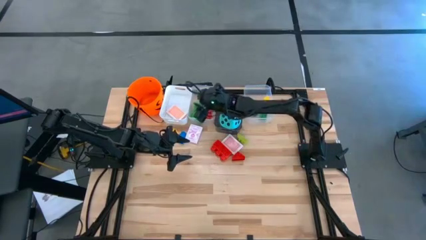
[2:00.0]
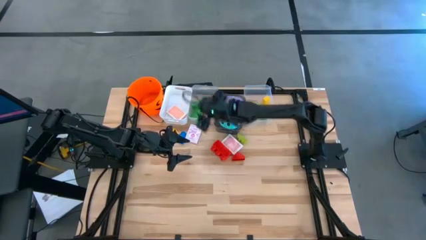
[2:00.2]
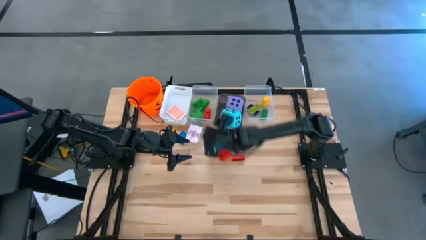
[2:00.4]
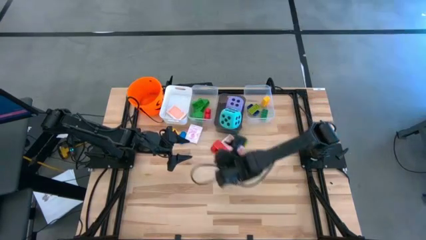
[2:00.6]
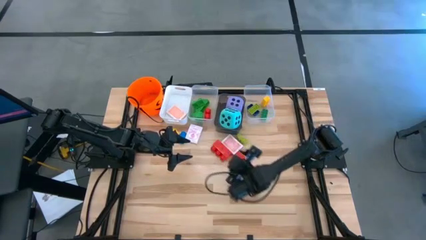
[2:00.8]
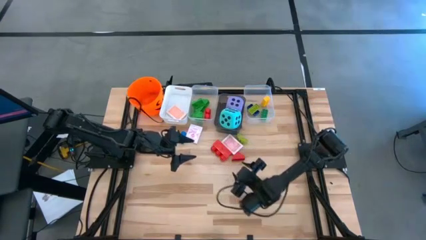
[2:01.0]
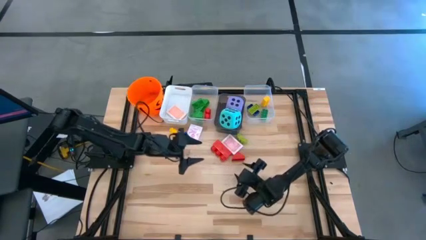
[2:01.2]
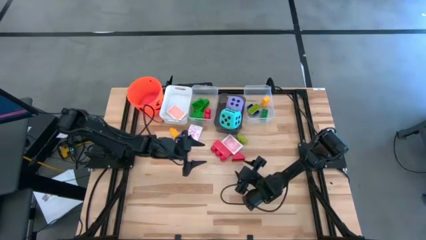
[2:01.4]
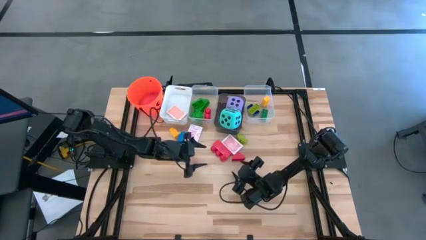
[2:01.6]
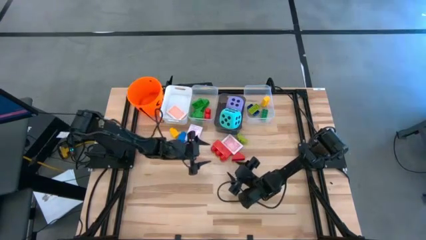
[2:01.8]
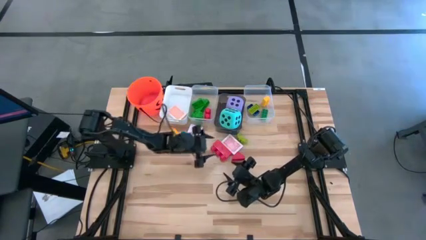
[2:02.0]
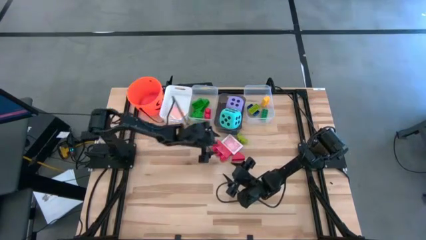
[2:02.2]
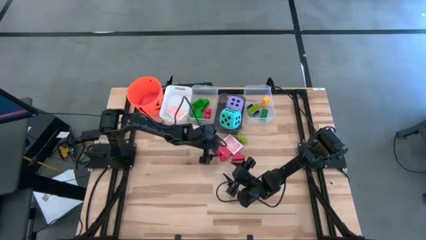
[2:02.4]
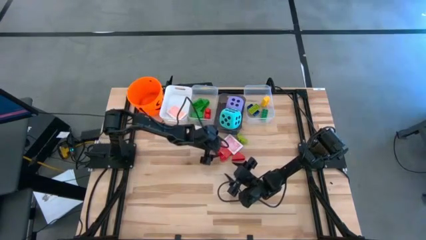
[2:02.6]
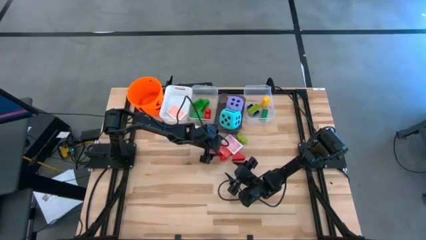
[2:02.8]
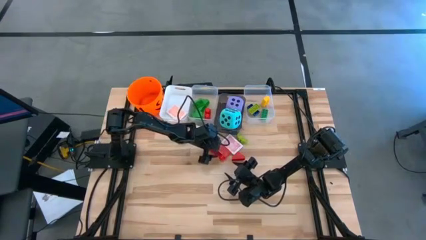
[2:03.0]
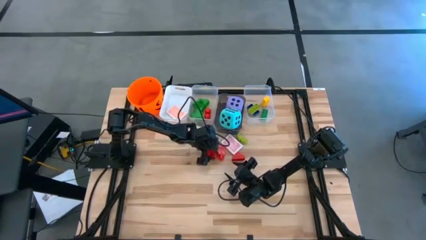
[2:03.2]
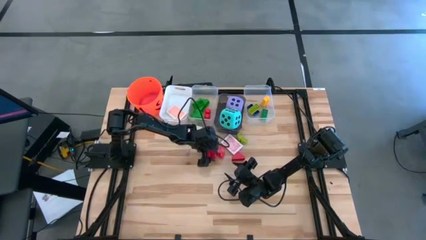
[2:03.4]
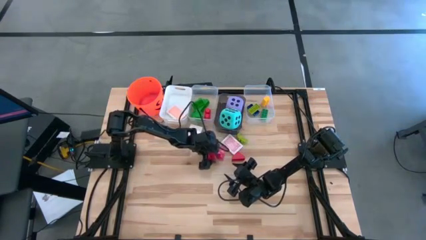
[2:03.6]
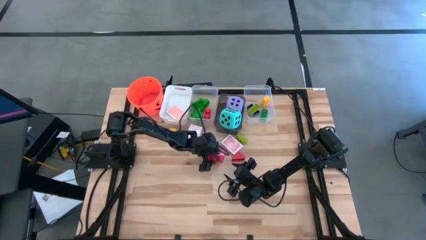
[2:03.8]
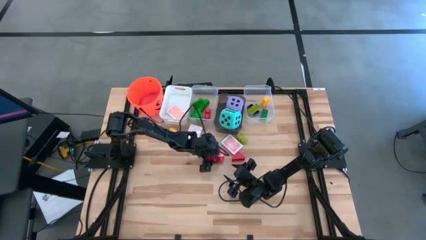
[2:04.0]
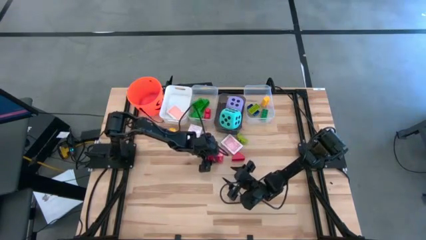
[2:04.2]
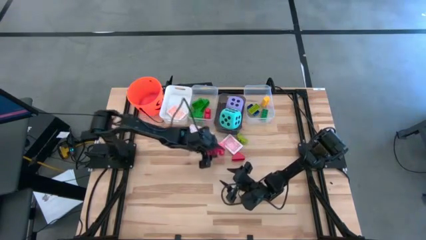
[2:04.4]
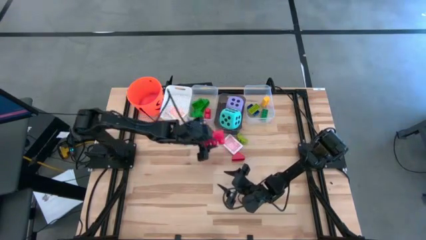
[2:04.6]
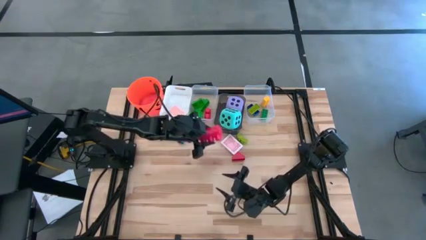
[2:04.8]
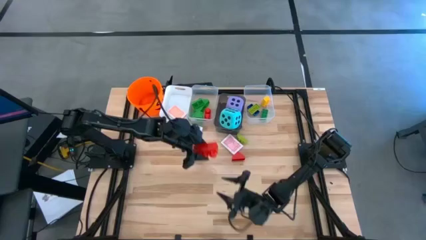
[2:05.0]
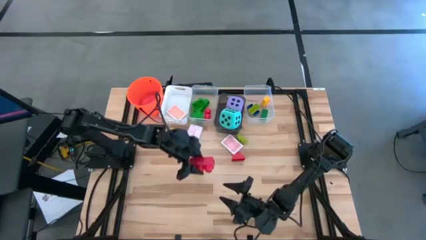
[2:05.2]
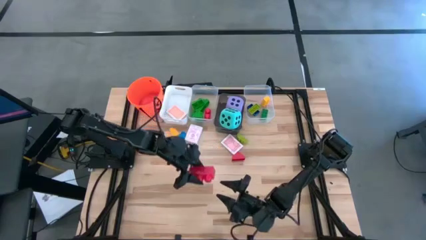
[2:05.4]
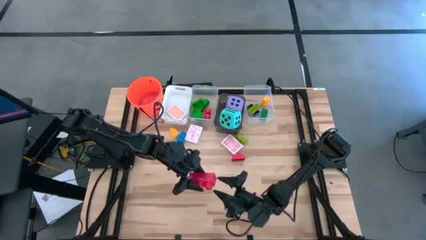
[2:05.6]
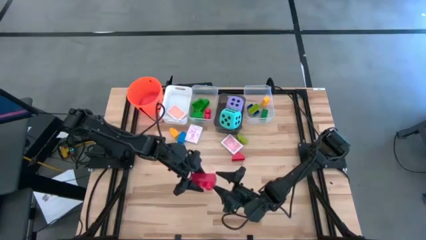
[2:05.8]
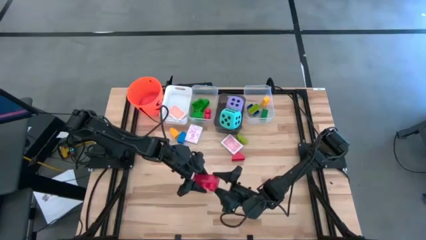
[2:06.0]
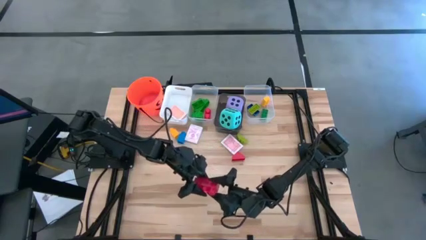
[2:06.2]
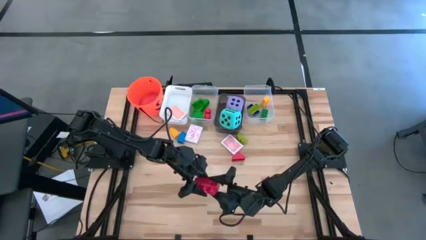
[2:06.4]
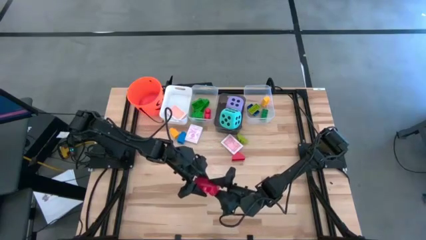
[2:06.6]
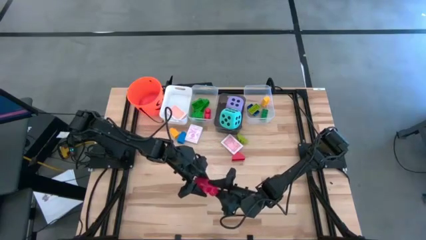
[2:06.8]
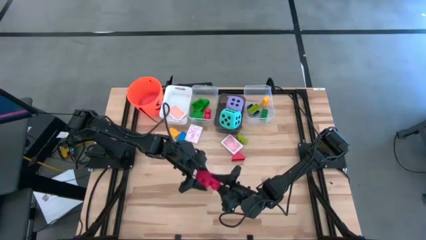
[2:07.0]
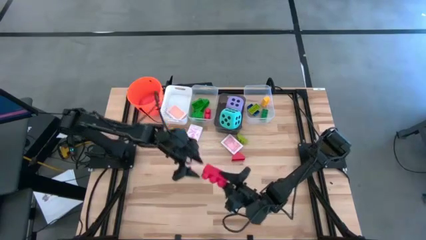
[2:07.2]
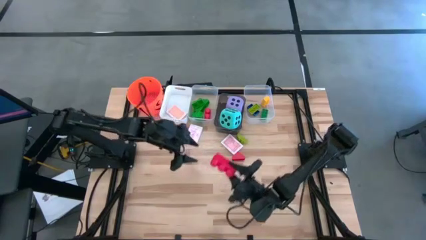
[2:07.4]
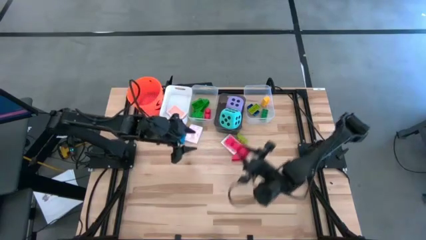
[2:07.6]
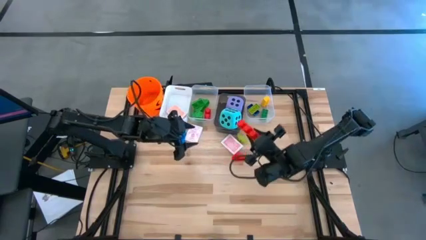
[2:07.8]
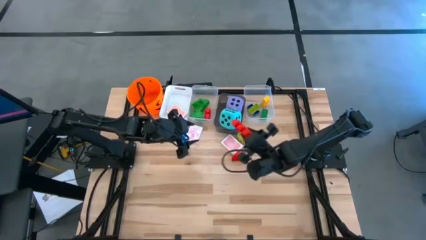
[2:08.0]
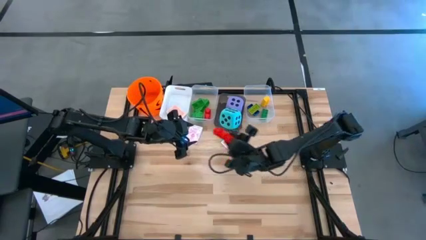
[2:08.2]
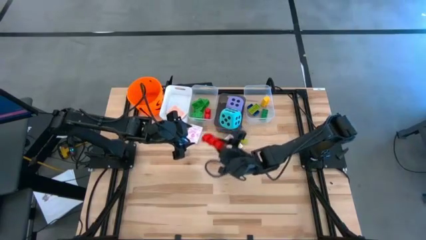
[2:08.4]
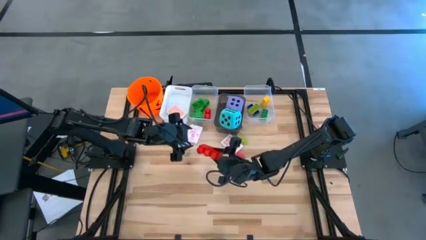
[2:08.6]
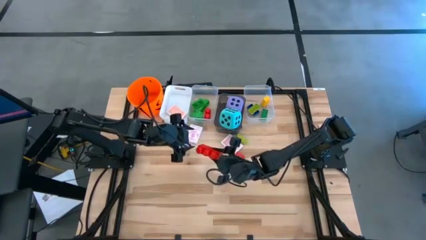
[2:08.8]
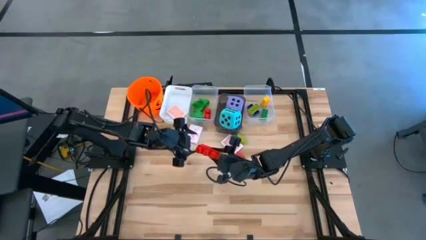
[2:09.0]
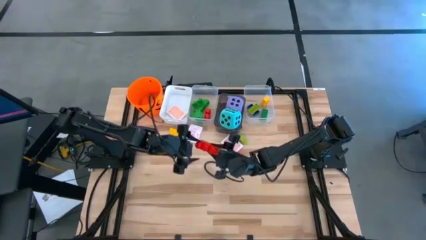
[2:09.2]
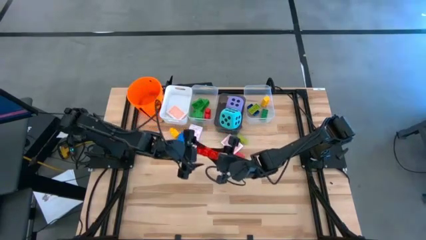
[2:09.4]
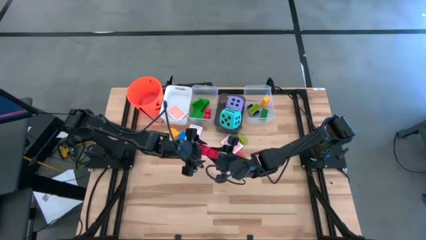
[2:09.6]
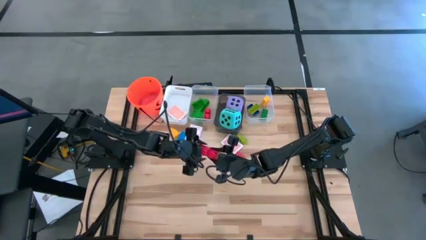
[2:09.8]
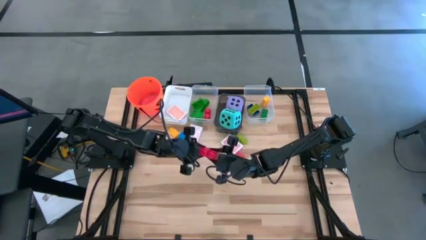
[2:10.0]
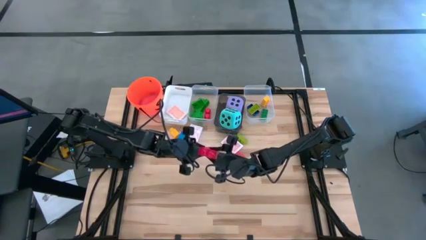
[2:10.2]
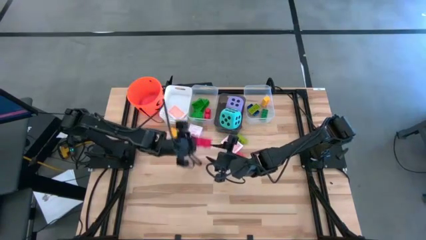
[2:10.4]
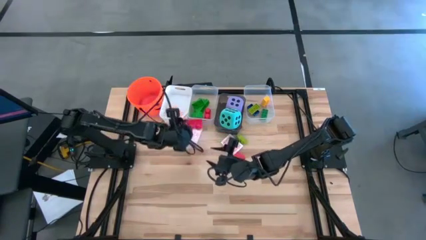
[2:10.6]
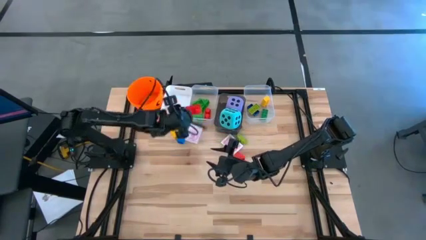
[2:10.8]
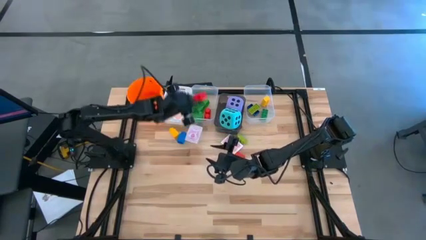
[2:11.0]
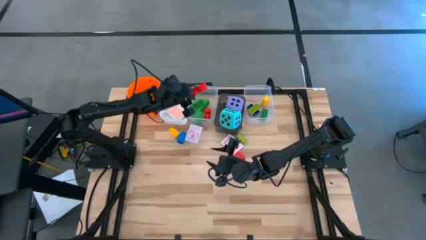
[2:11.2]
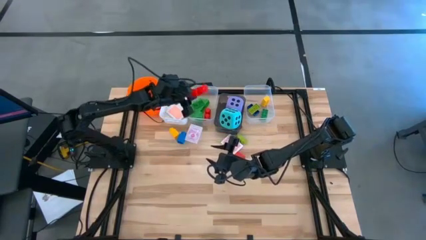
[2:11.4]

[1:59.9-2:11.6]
Task: Pick & Place Toys
Put the large red game piece into the left transparent bin

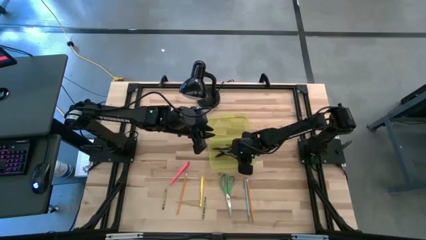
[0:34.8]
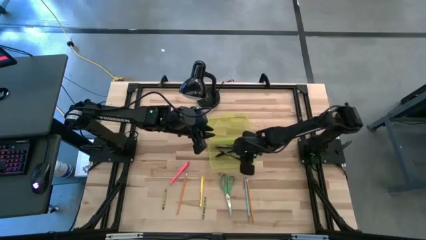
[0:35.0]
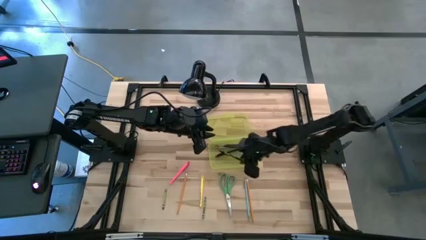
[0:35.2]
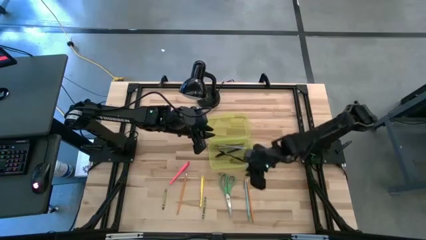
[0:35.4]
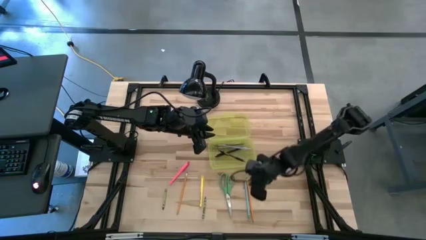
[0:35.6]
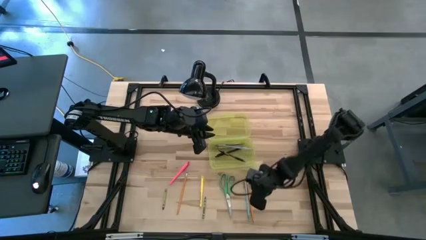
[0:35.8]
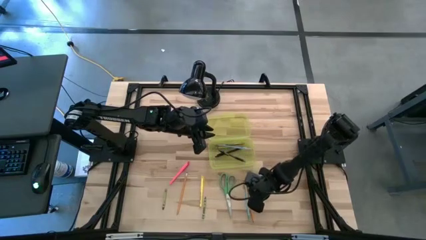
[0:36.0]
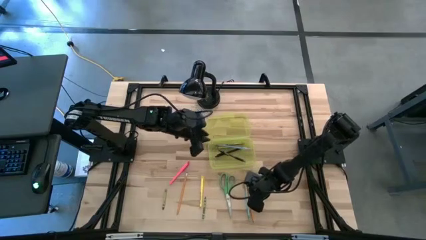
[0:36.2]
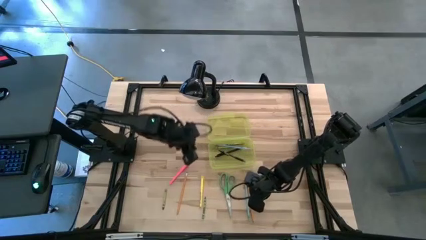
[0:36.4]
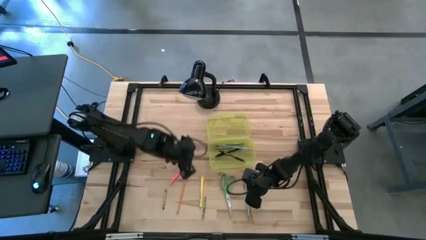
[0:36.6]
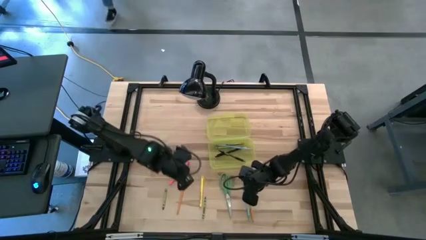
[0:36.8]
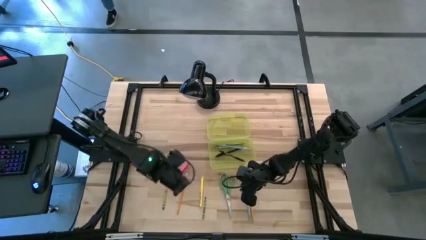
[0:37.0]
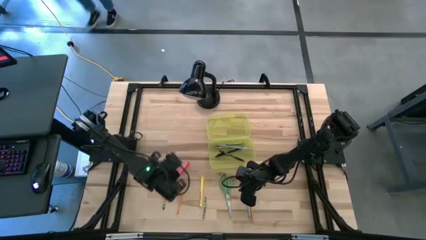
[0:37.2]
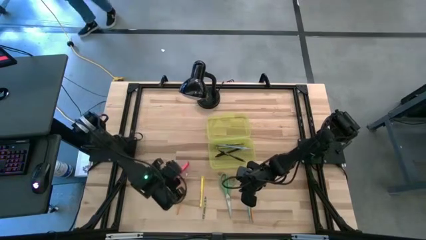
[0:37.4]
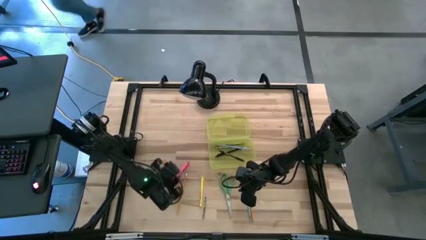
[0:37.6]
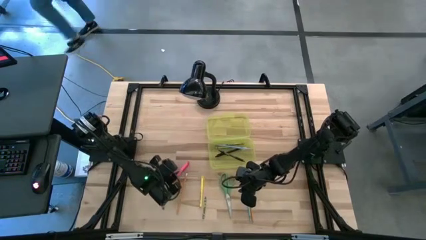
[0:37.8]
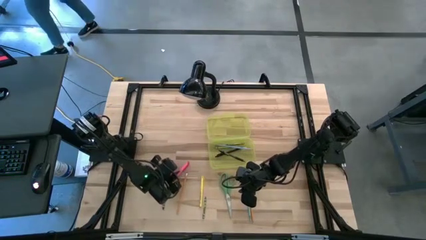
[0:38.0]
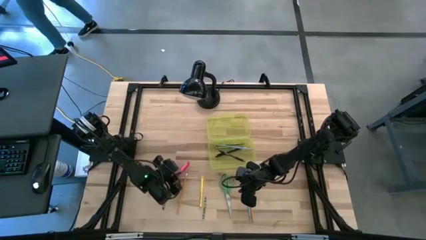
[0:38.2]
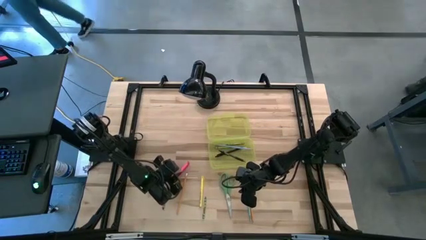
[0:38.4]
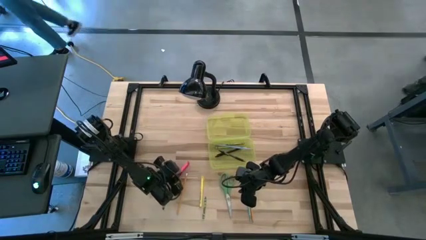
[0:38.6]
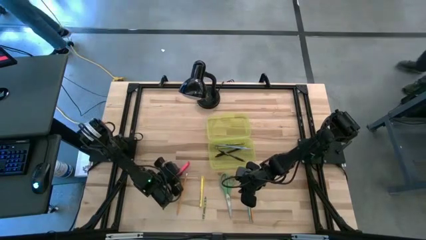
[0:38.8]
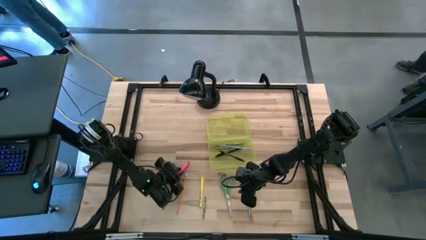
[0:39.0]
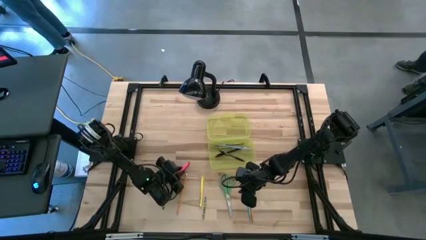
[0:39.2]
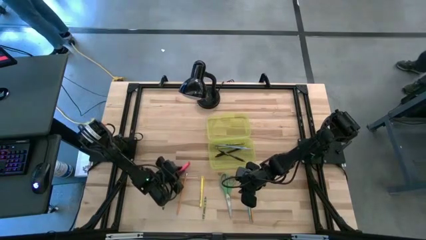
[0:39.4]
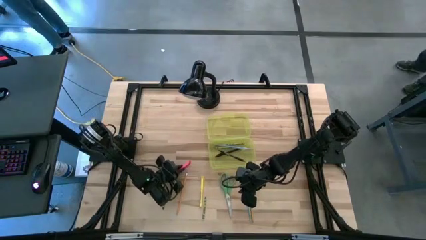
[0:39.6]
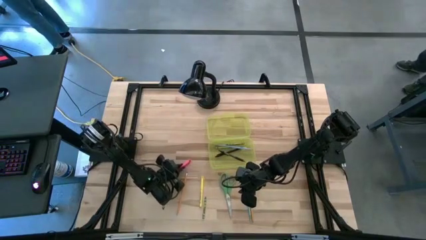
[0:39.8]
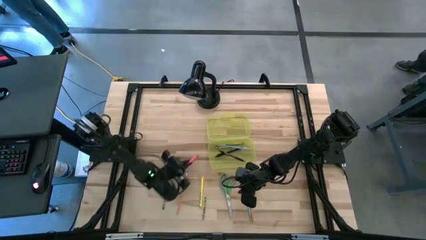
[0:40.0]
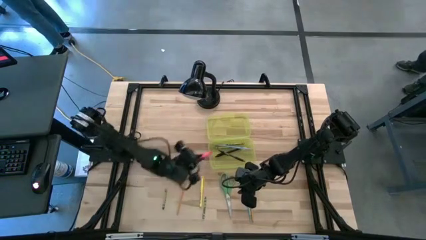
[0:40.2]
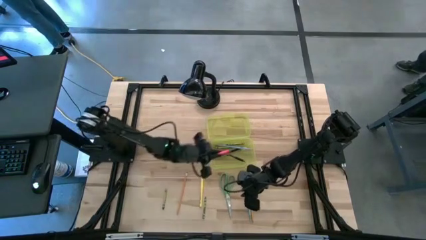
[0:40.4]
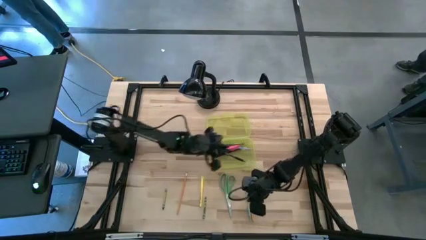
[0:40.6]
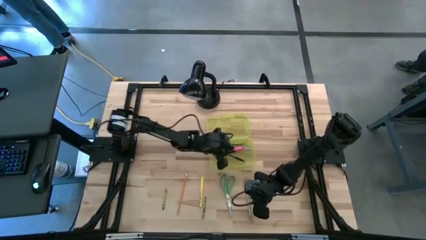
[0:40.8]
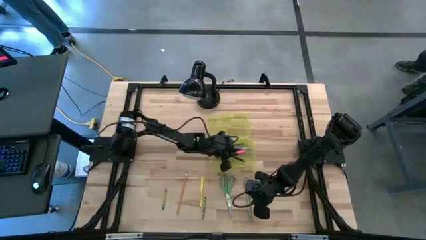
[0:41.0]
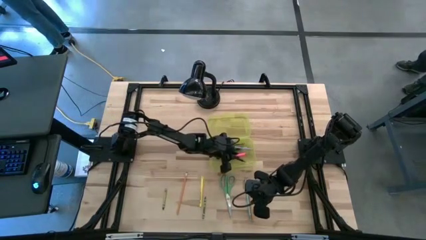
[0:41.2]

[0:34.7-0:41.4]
Task: Pick & place school supplies into a supply box
Put the pink pen into the yellow supply box
